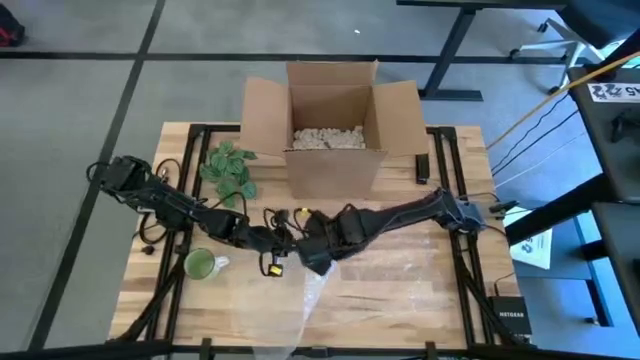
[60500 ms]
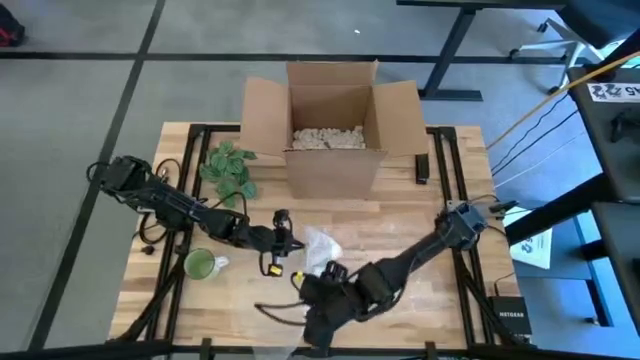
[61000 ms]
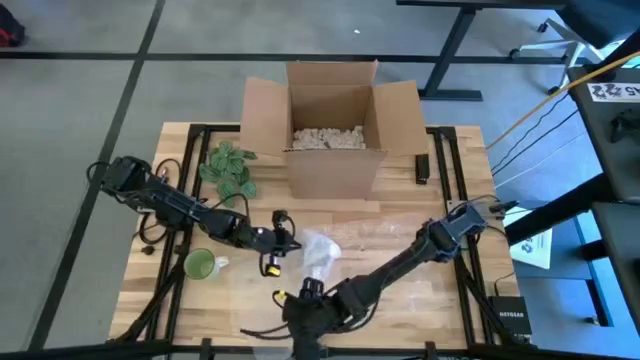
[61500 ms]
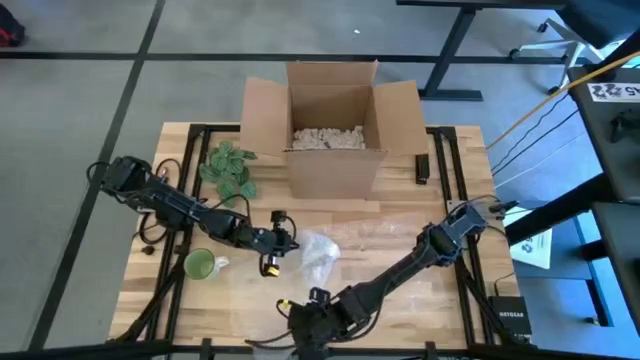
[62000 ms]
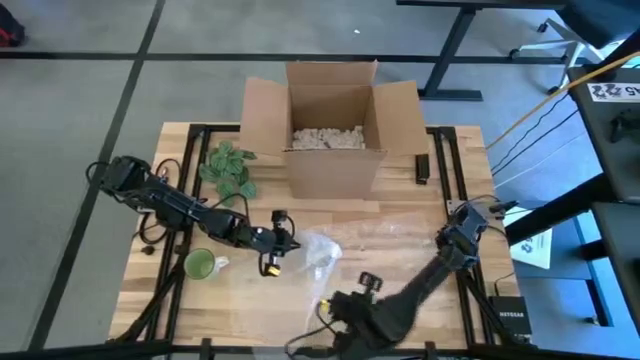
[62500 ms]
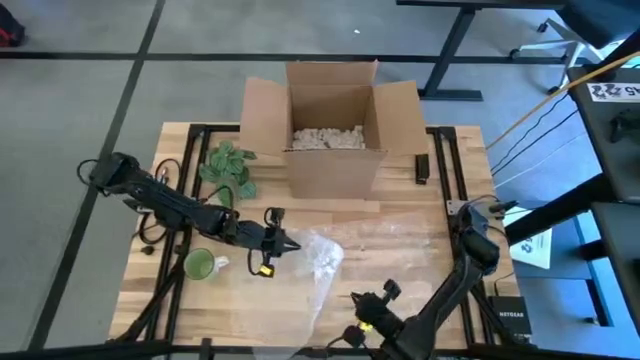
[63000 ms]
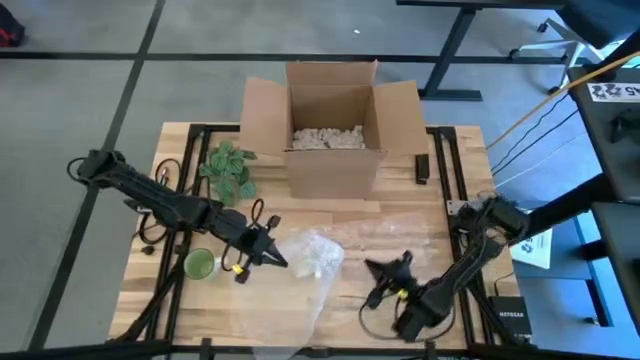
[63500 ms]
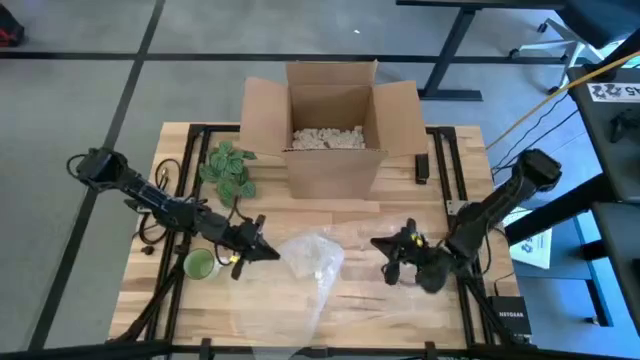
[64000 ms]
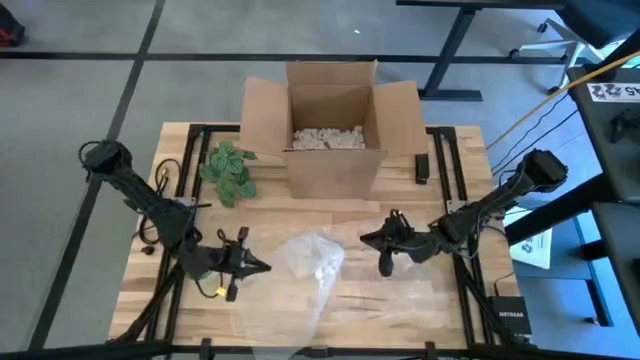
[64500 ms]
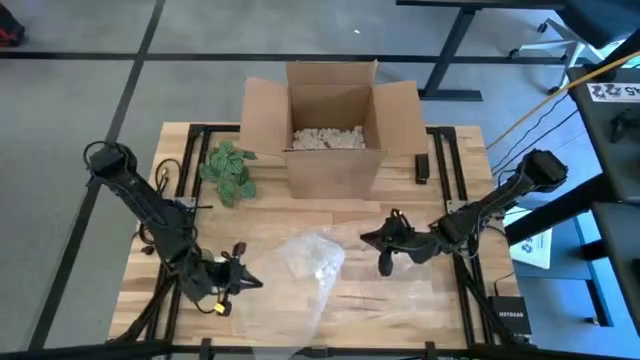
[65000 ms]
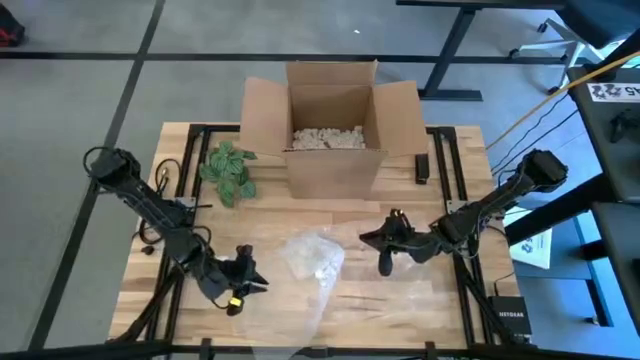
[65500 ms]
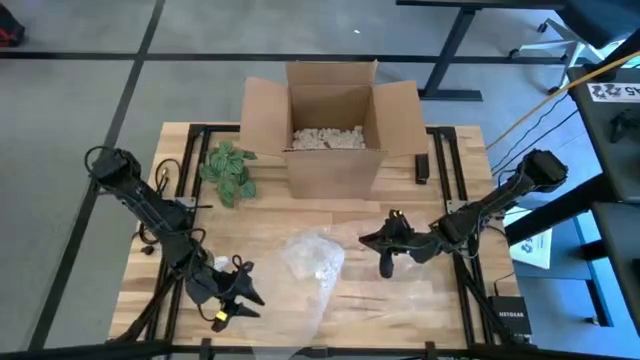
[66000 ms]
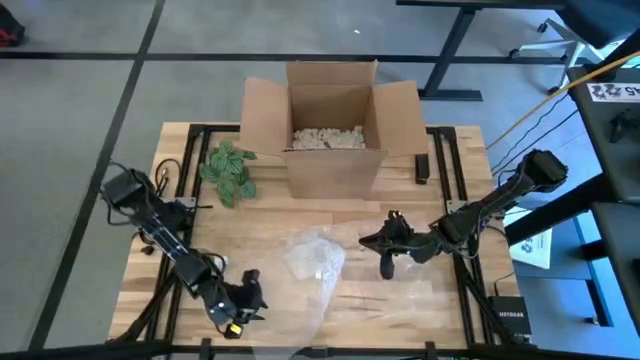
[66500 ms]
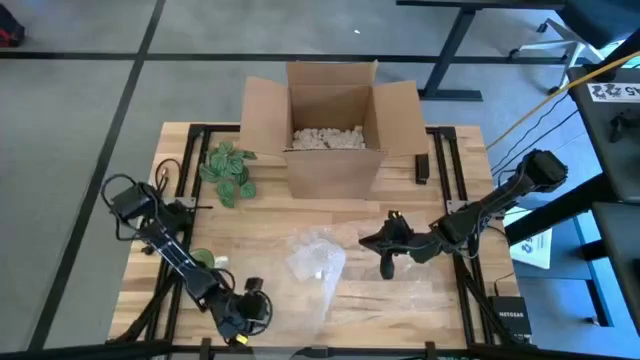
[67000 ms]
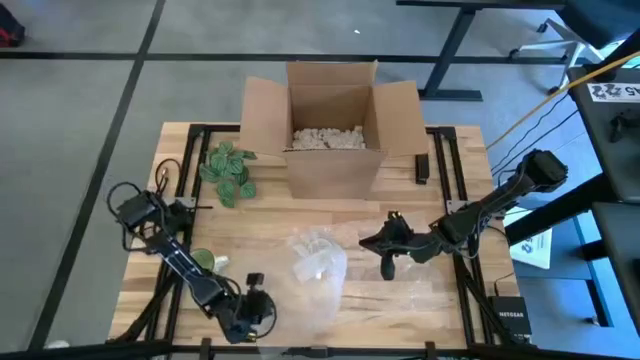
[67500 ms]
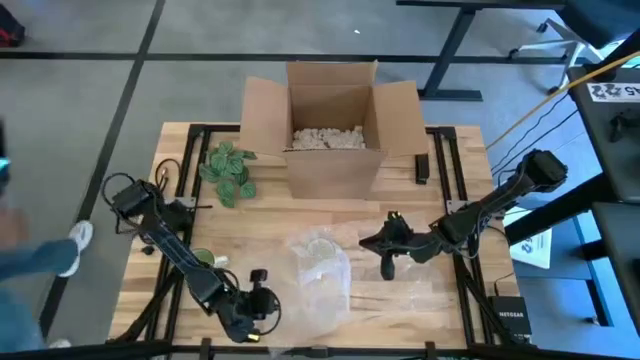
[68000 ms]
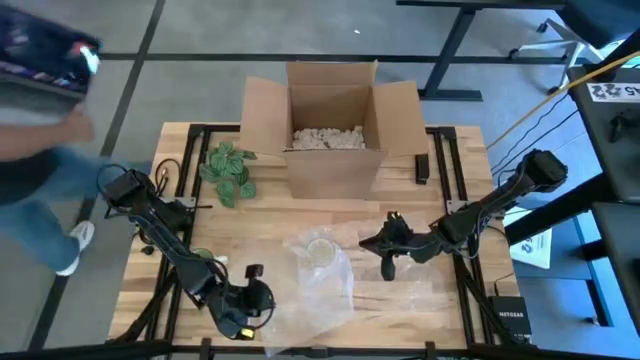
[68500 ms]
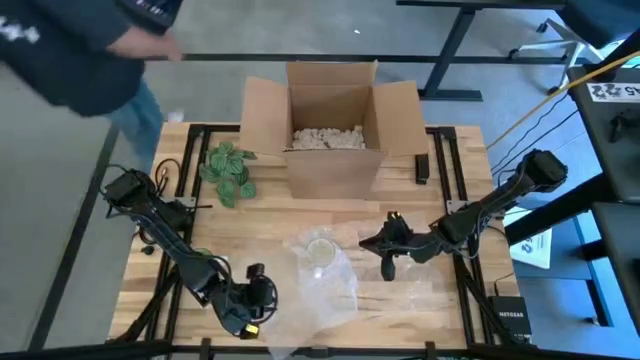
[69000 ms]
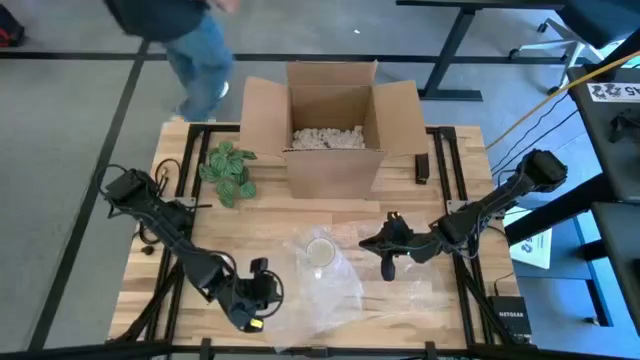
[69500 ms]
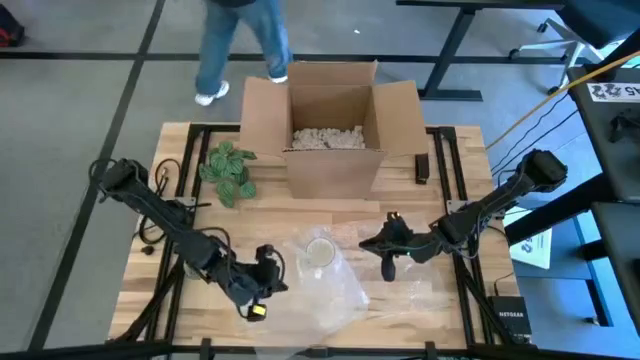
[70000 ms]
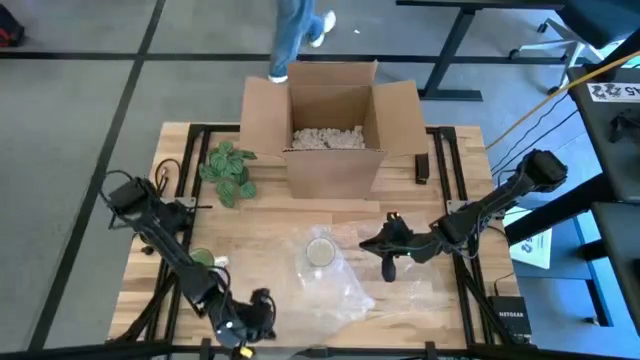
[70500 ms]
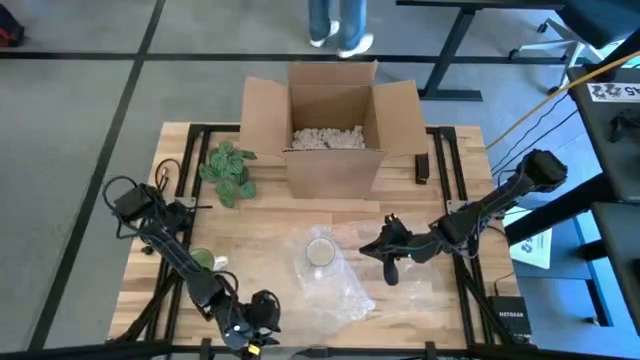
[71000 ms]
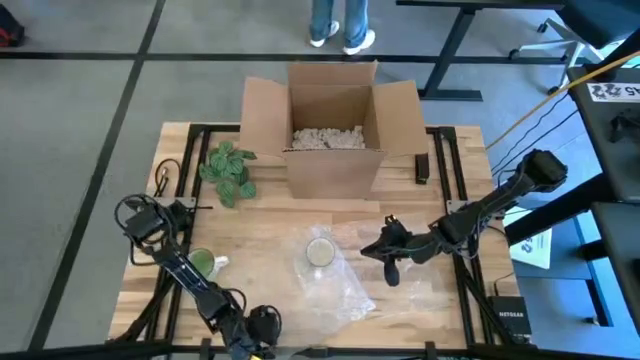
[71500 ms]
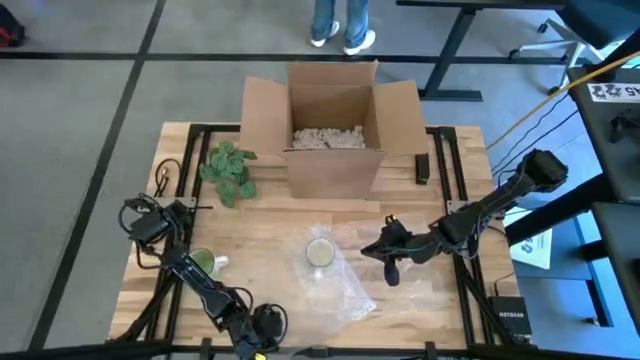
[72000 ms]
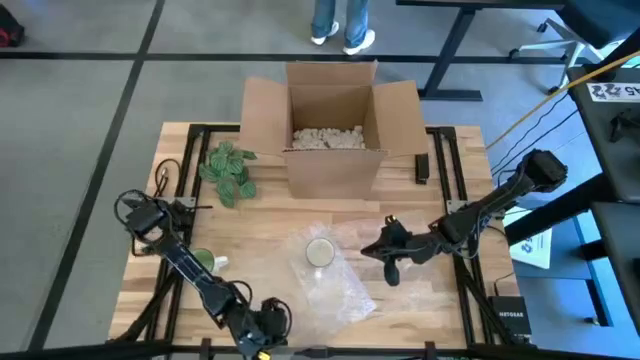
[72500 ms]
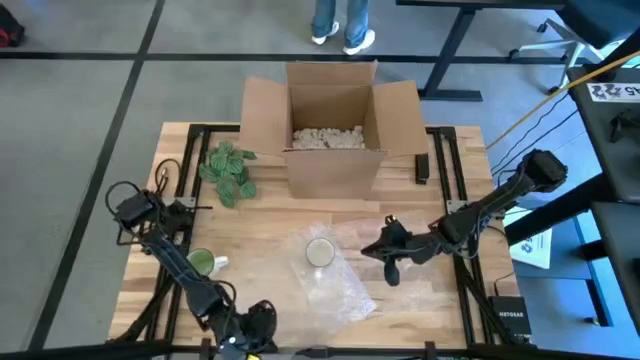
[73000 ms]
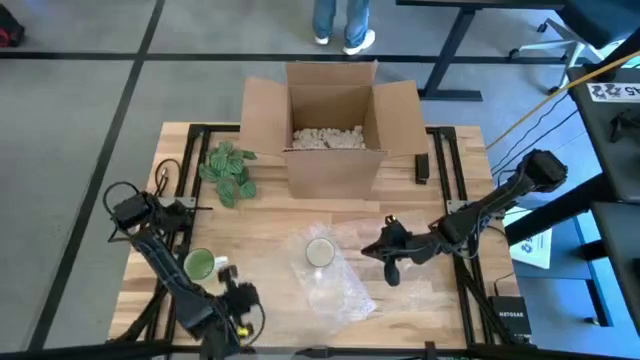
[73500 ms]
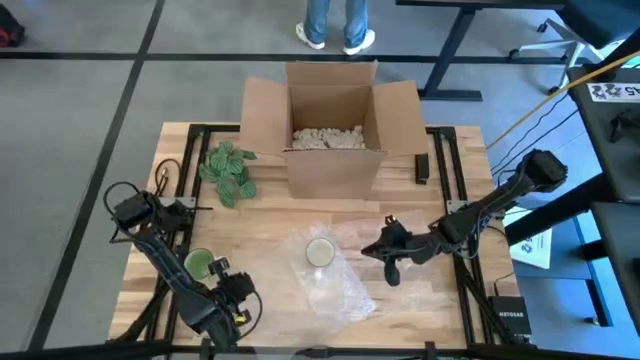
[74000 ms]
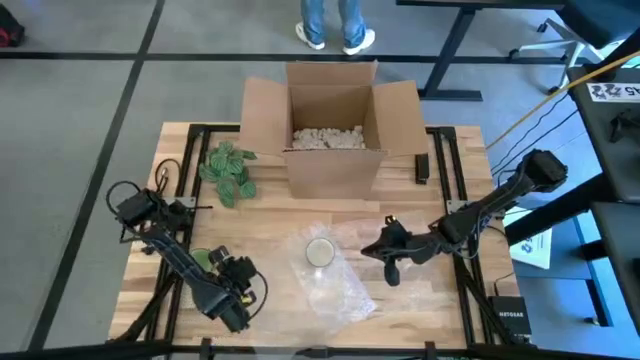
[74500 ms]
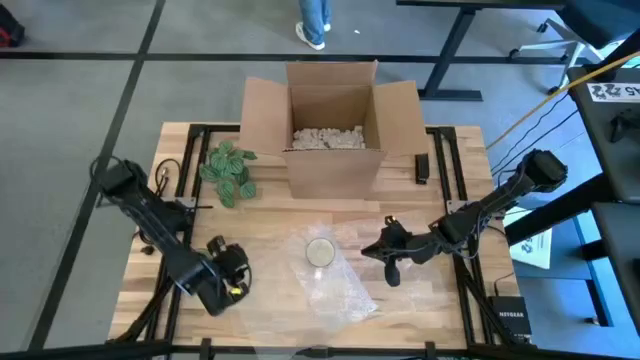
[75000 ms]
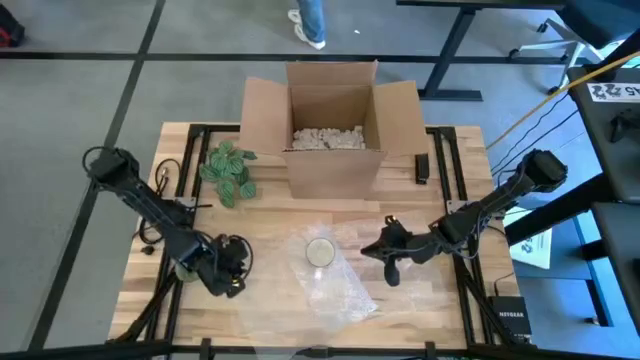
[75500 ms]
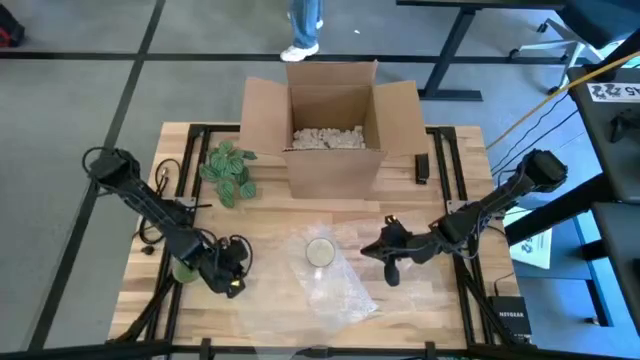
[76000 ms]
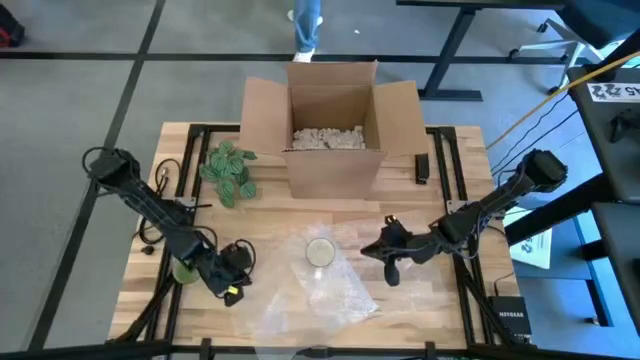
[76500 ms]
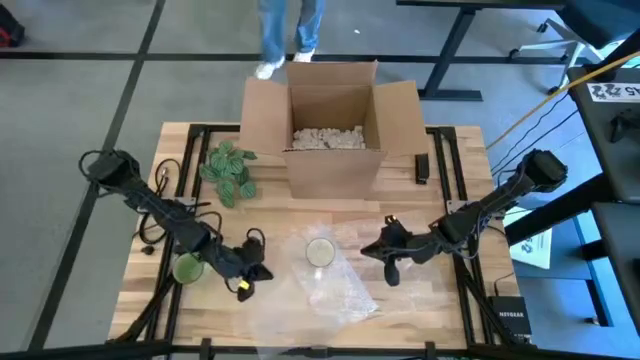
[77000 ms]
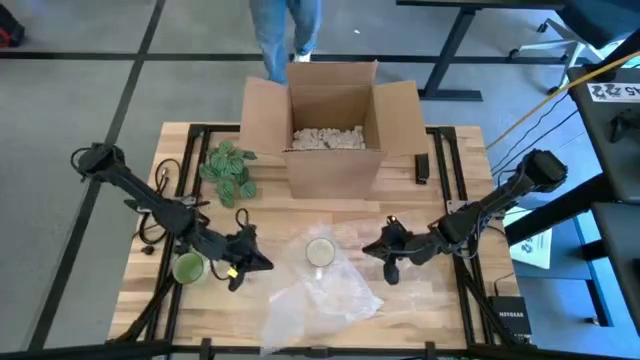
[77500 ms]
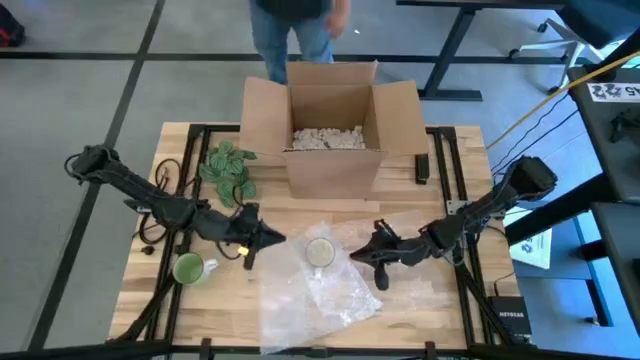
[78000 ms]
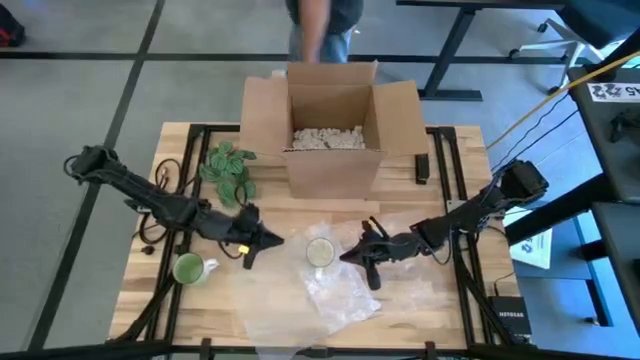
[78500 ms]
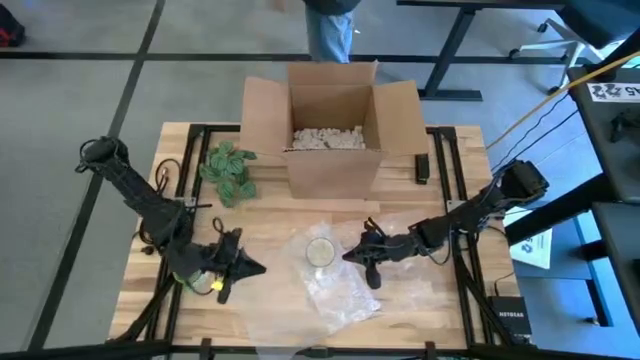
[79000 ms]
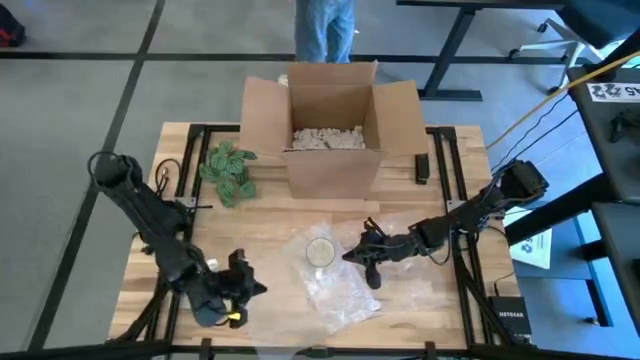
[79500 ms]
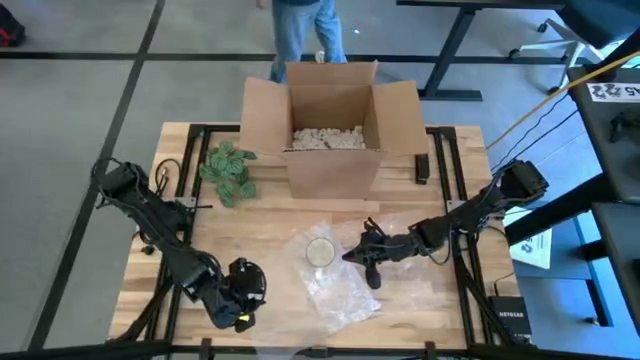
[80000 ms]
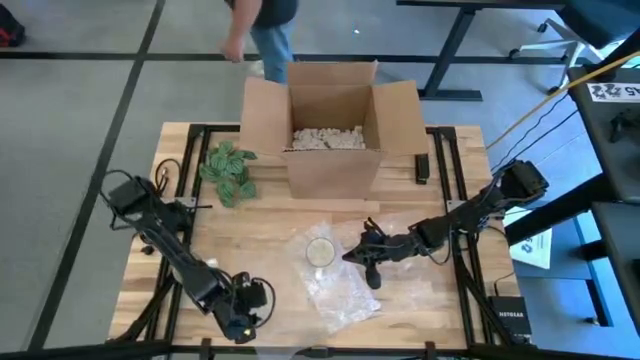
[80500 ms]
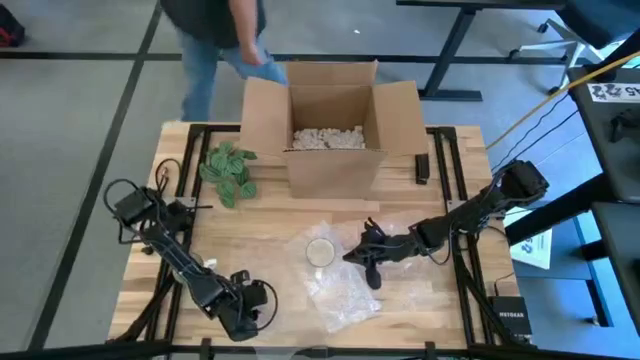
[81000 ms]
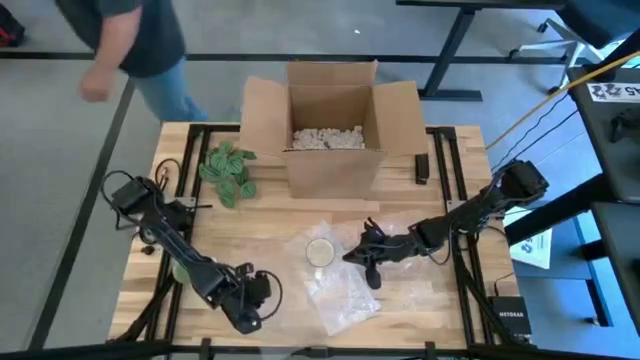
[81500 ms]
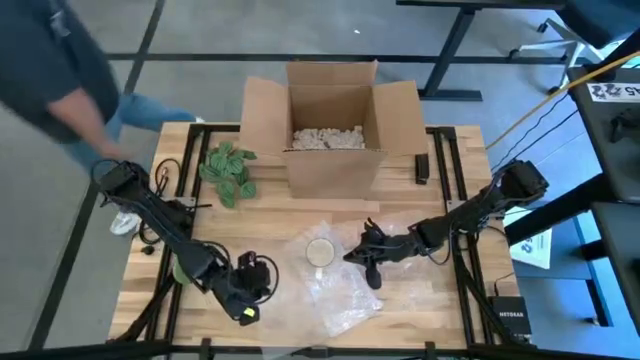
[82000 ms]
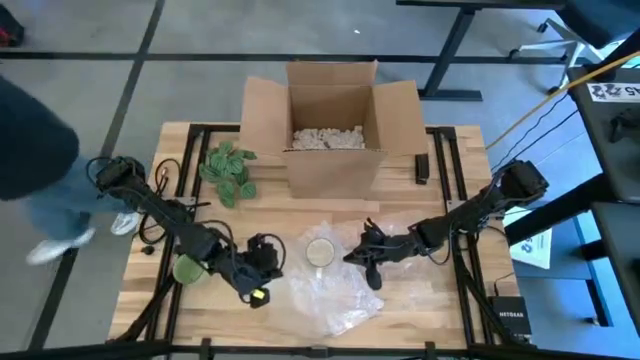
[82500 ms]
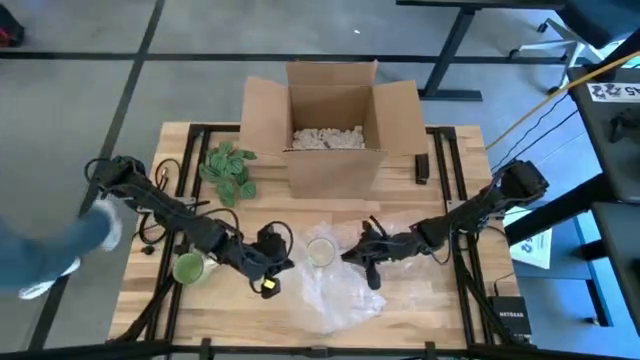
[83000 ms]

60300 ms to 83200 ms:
Task: wrap mug
Wrap the blue mug in bubble wrap
